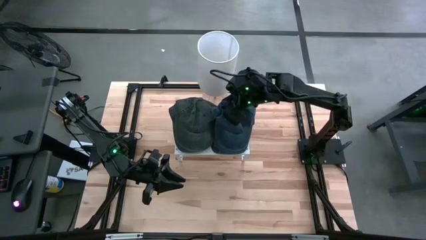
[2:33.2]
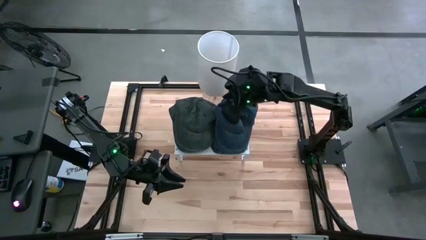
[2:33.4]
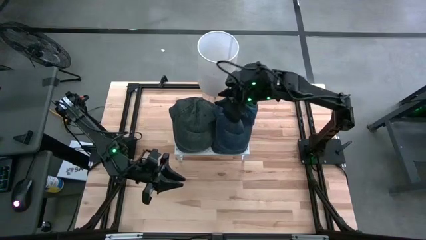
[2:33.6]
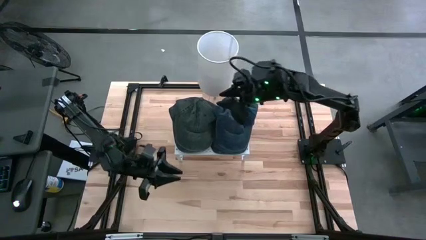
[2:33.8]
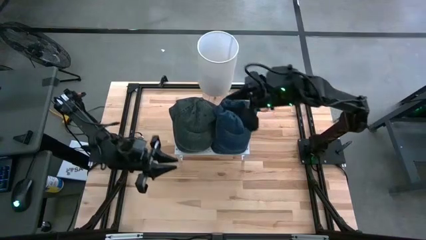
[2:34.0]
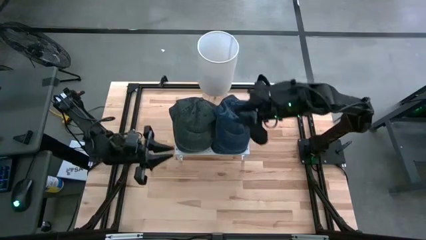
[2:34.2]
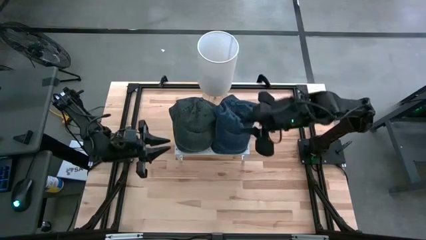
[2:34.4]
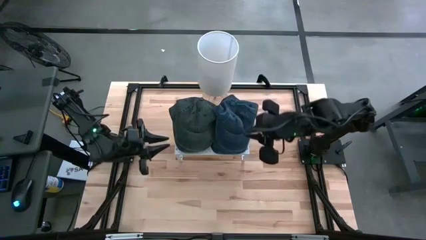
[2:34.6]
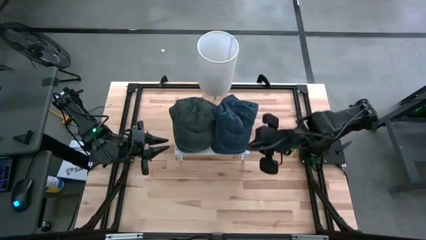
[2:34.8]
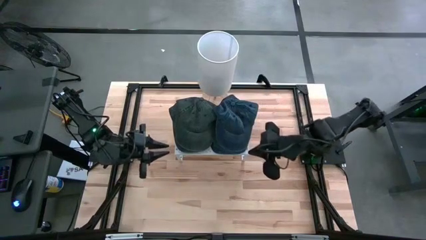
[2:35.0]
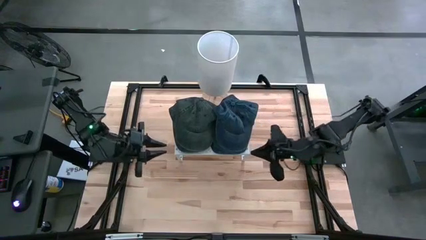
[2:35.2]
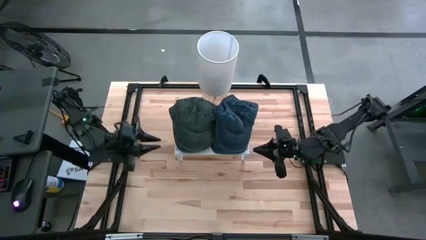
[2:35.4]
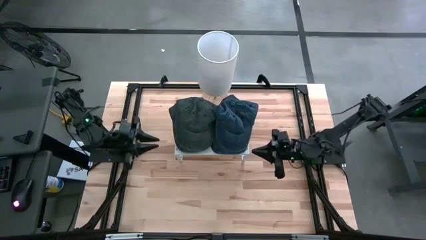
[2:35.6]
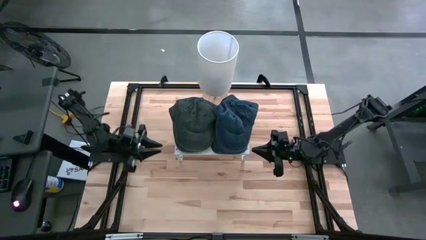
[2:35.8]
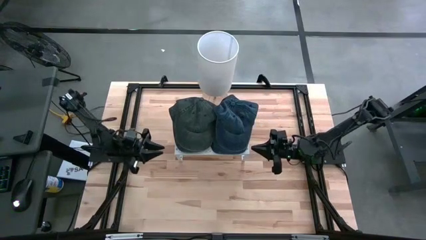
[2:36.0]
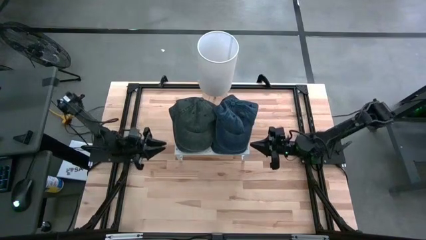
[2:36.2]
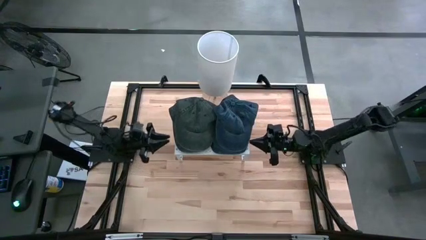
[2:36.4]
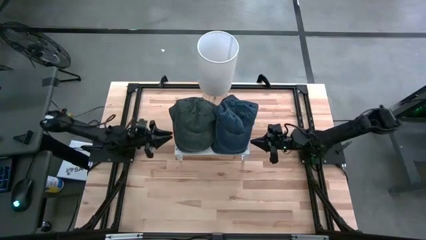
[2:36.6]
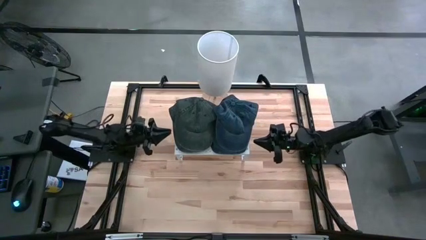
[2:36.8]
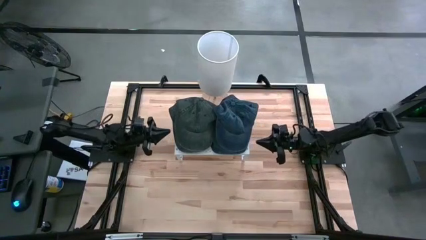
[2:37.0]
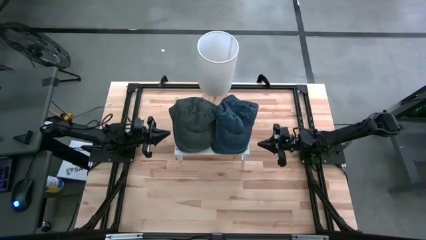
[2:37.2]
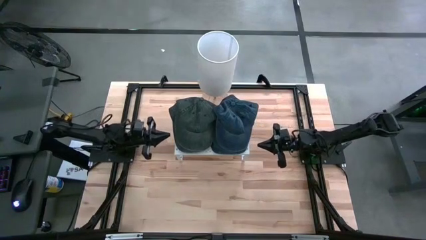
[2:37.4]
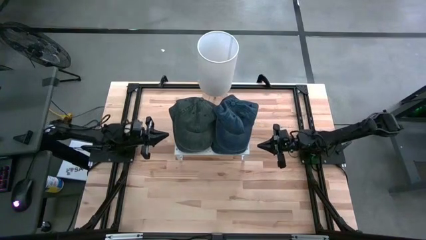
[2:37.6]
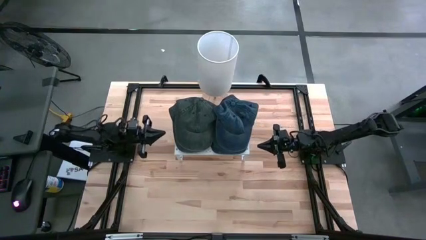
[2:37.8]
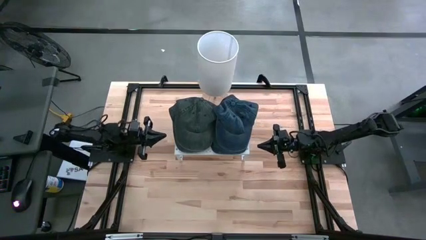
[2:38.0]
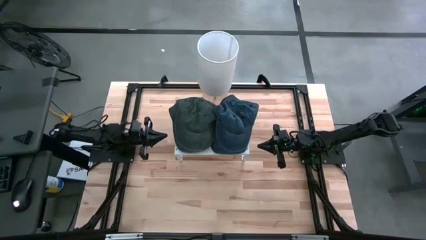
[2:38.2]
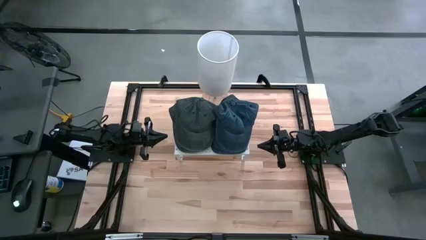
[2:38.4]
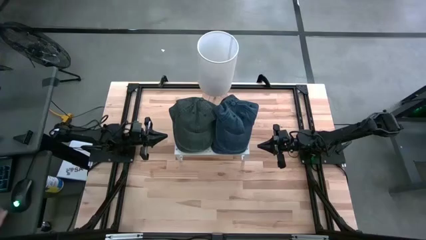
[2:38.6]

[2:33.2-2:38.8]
Task: Pick & Place hat
Return to Home Position

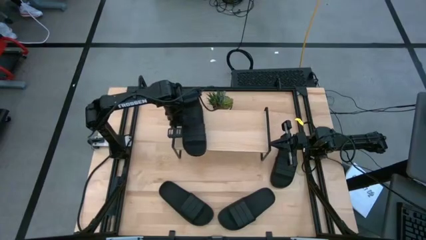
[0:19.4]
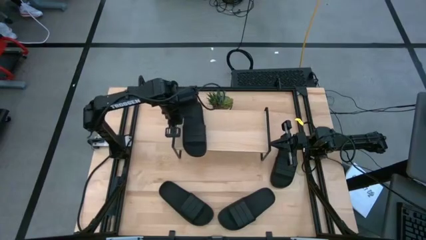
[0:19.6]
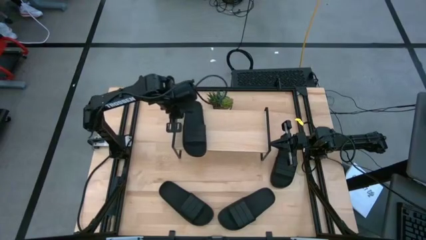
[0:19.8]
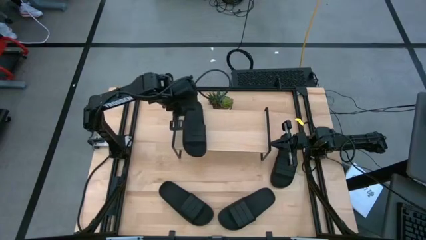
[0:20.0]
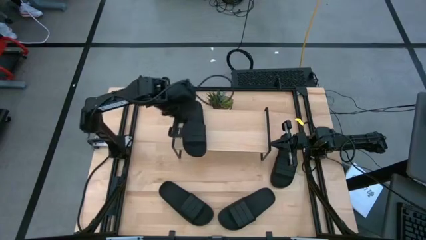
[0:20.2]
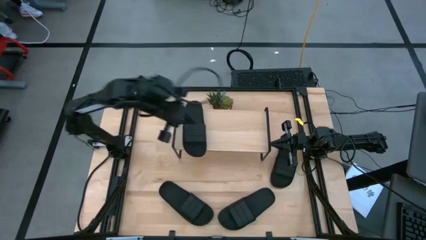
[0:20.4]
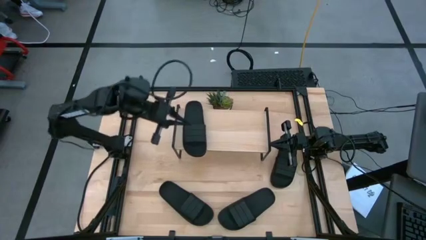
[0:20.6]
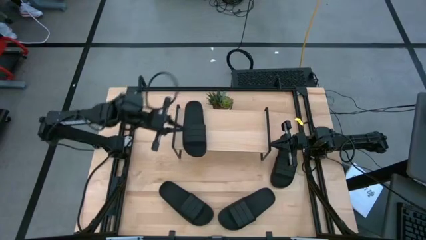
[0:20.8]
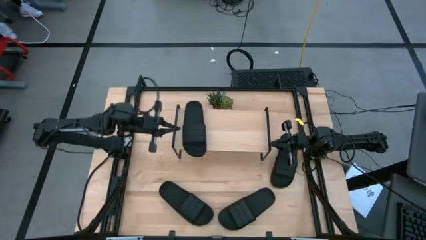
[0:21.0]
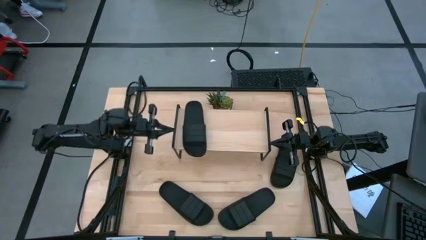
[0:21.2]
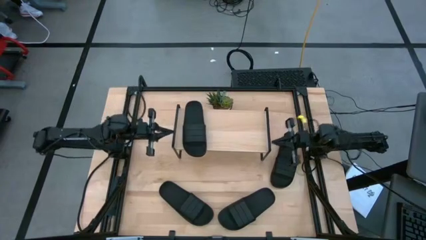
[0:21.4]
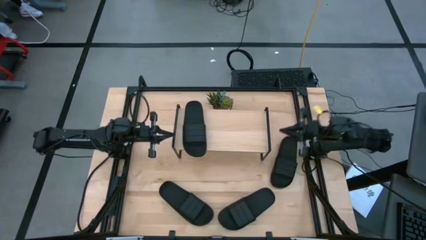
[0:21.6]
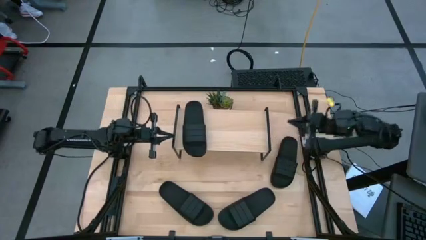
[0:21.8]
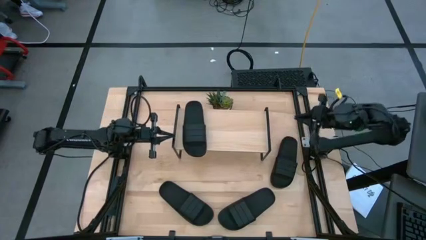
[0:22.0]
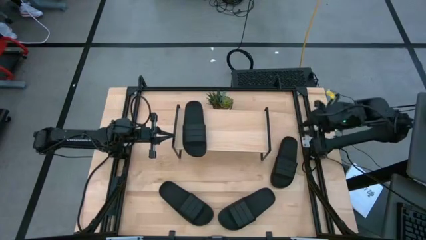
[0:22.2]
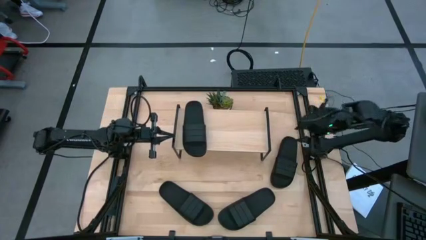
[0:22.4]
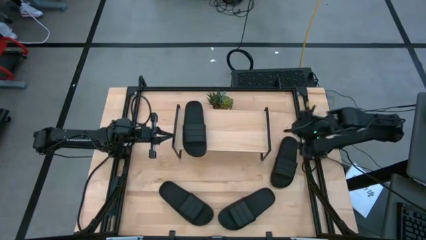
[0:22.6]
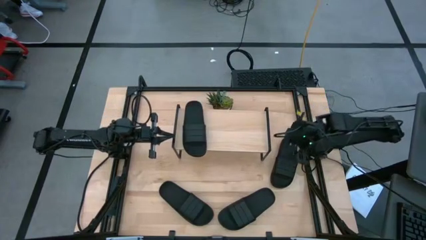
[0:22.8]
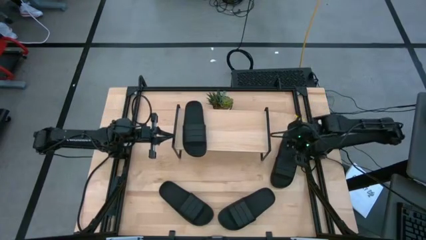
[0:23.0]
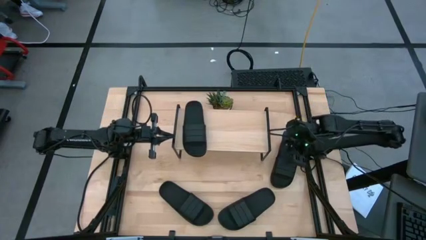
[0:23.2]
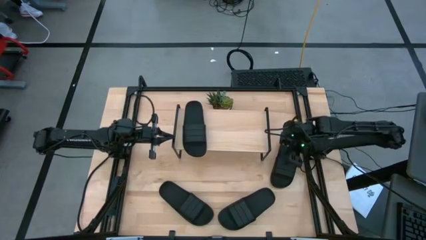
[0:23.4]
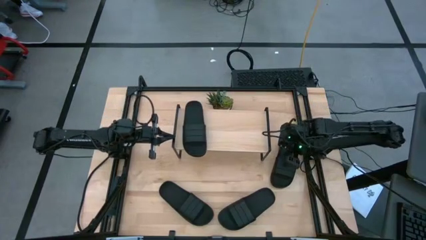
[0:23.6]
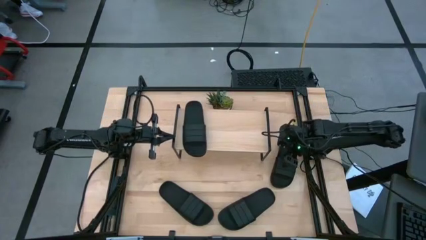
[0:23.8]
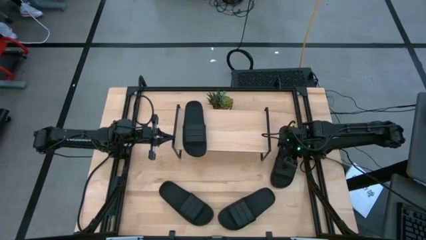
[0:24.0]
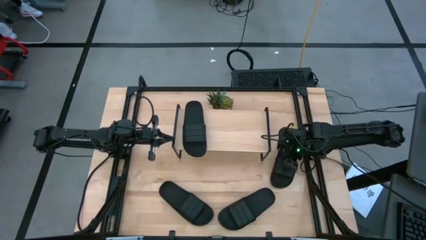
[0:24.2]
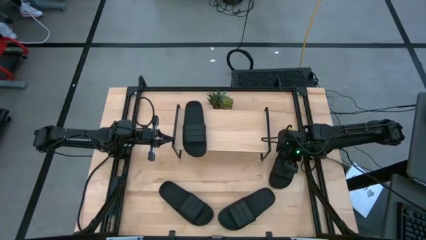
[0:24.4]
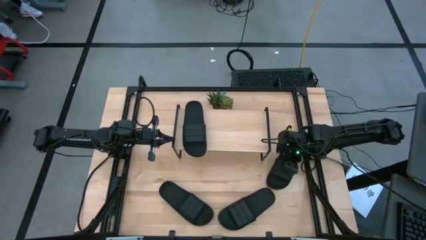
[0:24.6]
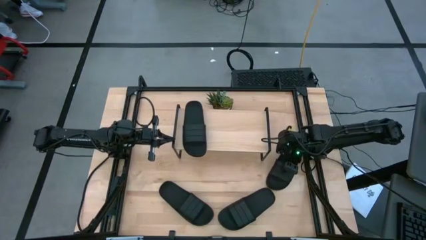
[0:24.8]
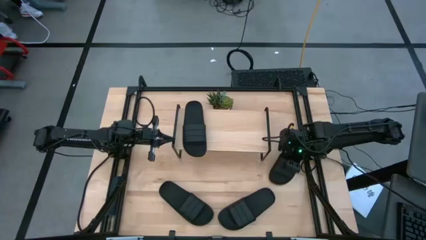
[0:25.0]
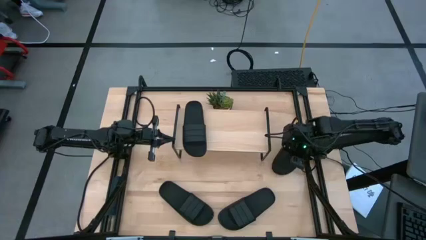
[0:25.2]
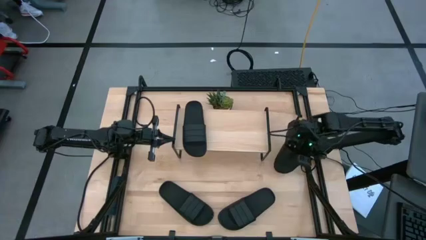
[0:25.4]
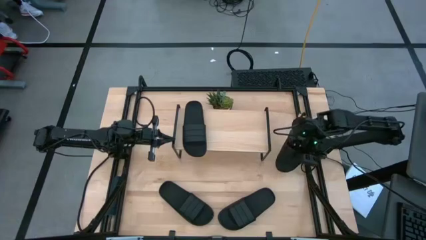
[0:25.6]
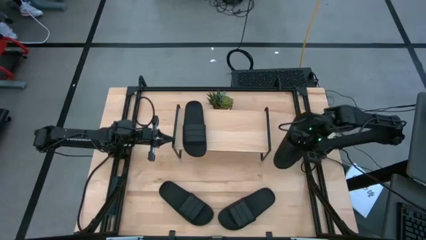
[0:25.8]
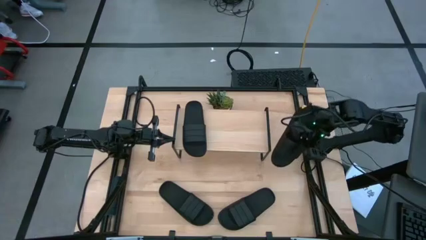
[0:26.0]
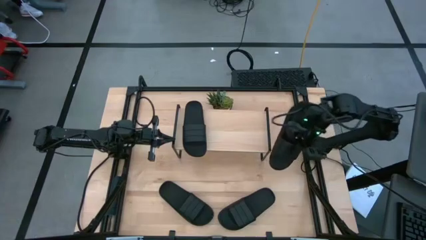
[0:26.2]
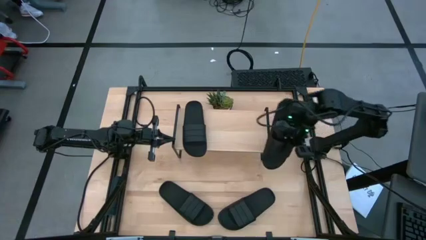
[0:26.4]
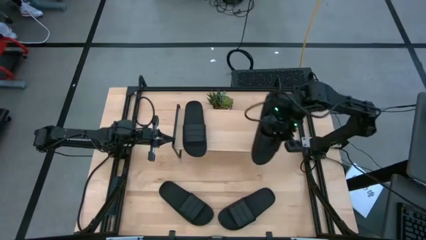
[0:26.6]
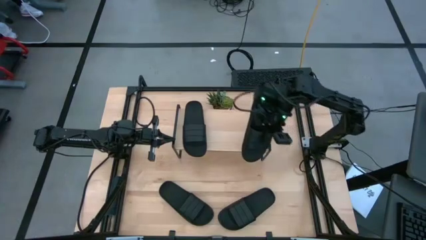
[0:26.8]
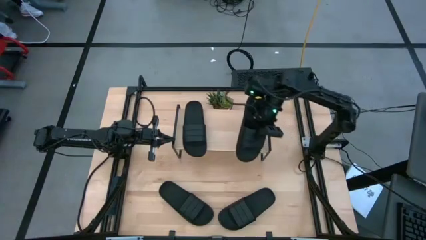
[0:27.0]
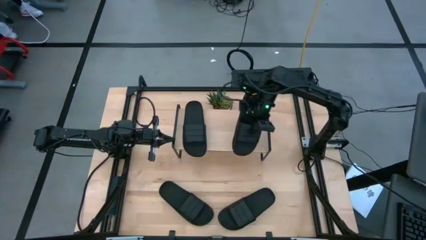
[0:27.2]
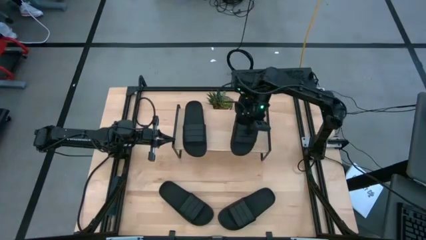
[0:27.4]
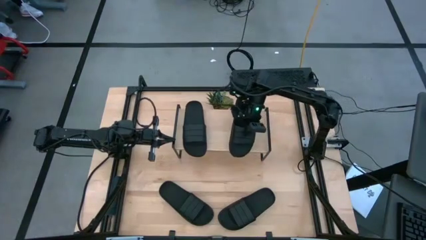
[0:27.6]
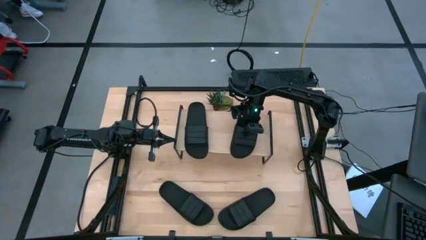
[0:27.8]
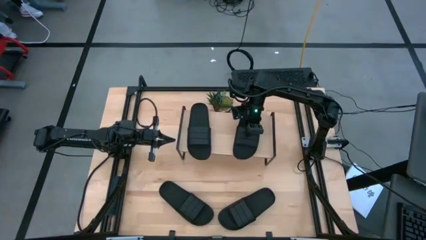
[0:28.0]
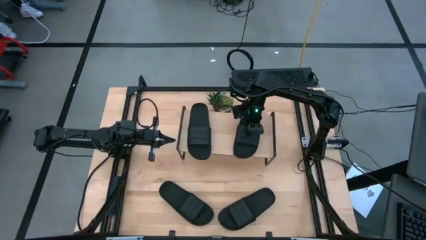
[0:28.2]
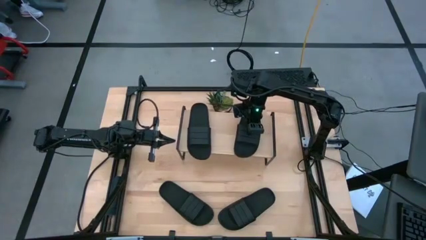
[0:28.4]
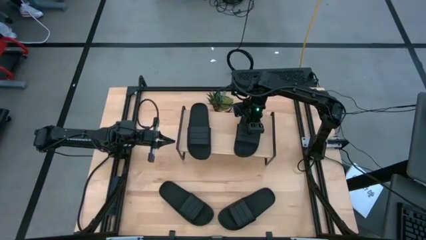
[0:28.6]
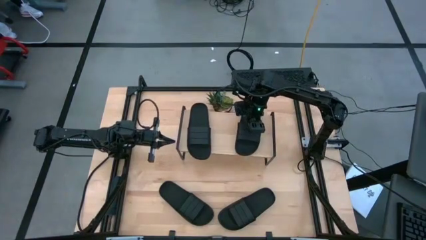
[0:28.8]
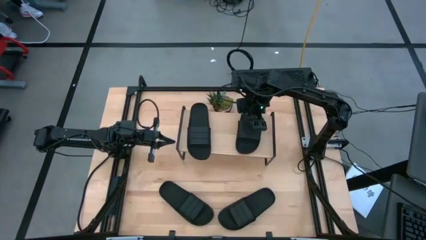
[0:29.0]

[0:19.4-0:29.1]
Task: Pick and place slides into the shelf
Put the black slide on the shelf
